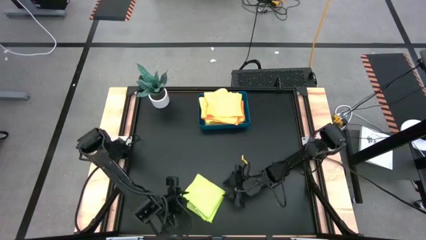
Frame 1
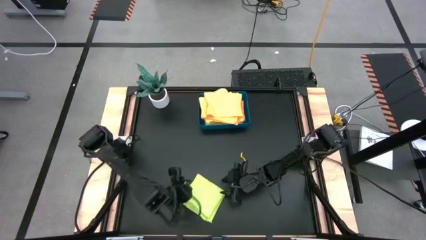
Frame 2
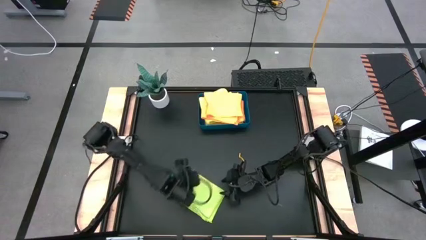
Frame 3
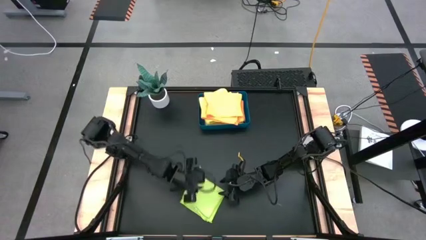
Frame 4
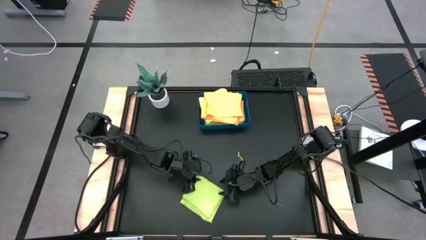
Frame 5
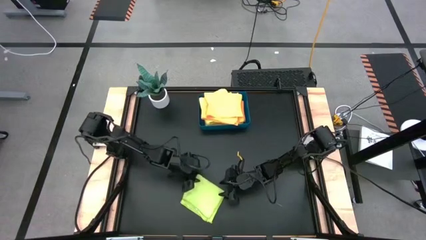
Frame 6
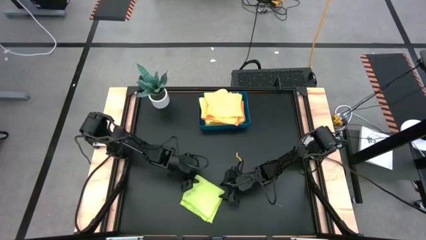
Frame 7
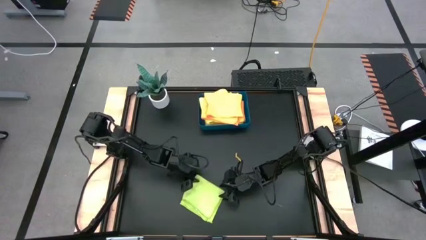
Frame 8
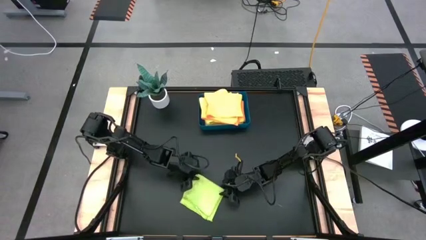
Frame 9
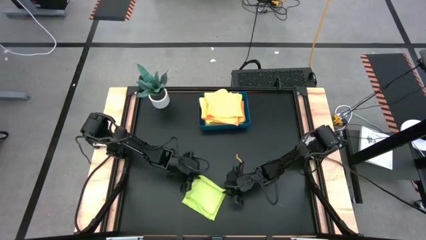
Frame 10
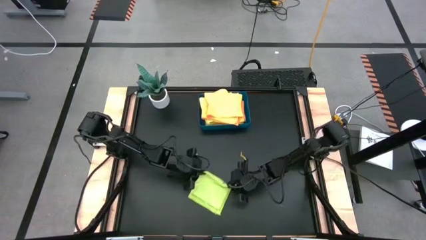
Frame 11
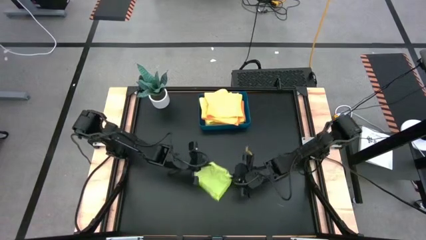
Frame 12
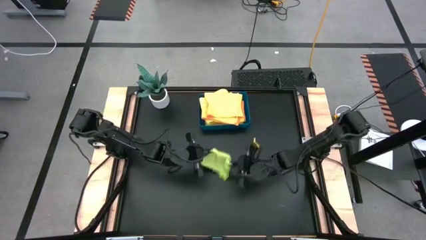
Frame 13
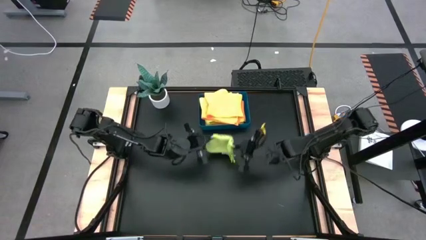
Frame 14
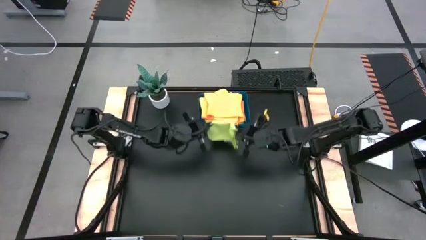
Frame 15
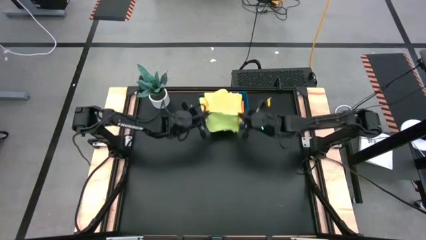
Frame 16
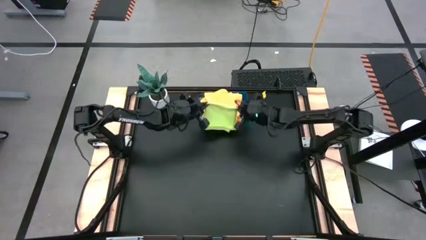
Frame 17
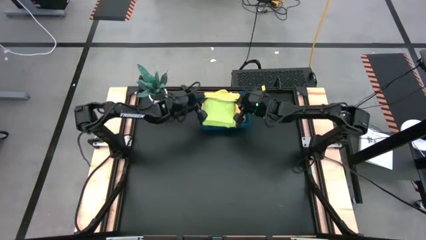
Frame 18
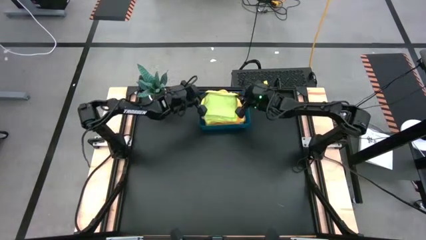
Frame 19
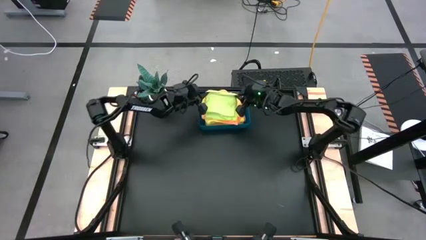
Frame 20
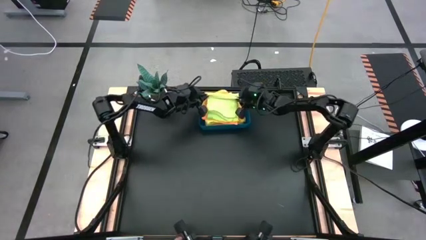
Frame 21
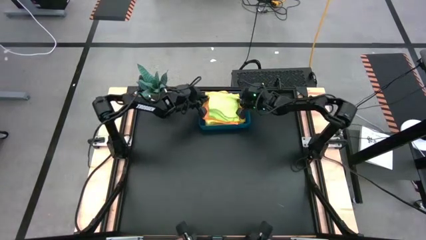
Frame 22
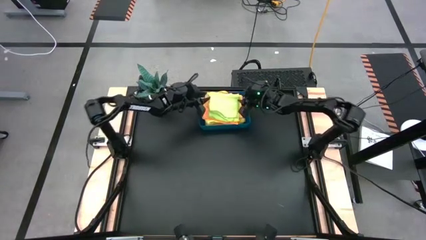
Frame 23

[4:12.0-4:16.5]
Task: Fold microfiber towels
Put the green microfiber cloth into the blue bin

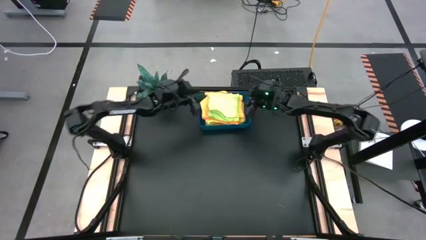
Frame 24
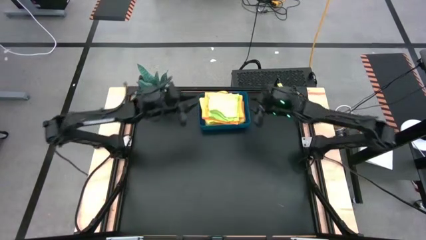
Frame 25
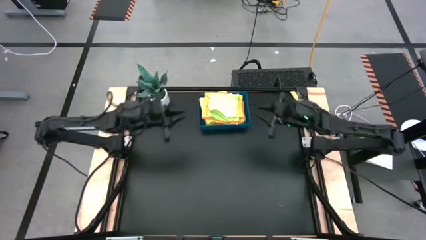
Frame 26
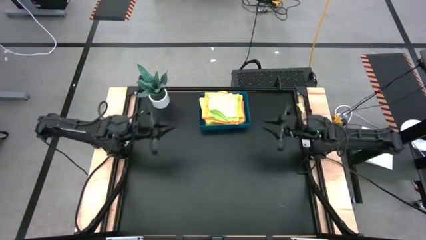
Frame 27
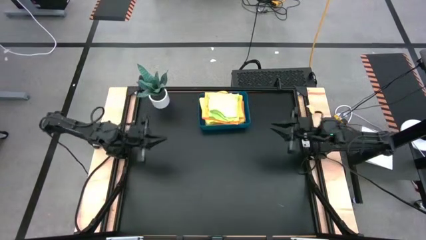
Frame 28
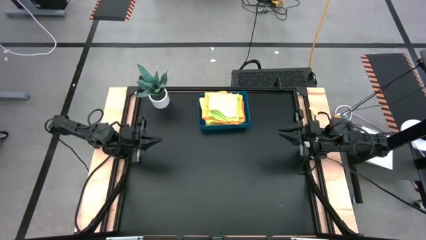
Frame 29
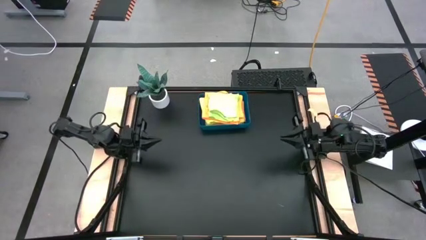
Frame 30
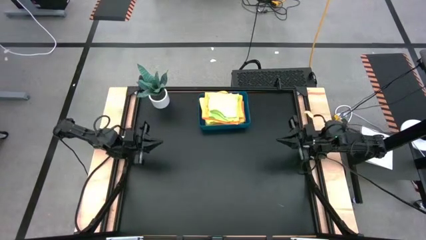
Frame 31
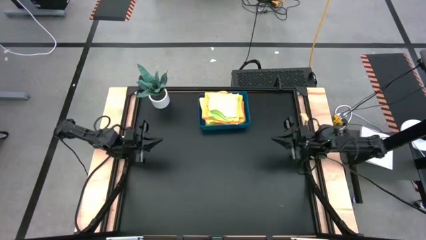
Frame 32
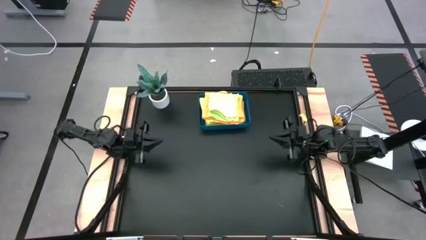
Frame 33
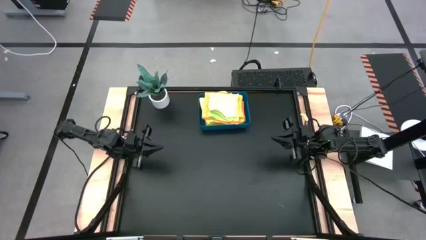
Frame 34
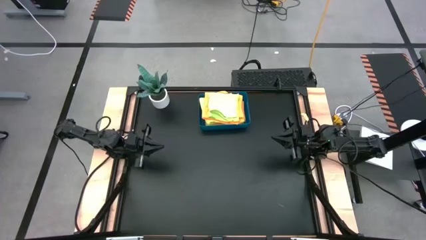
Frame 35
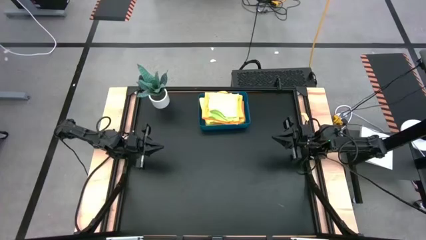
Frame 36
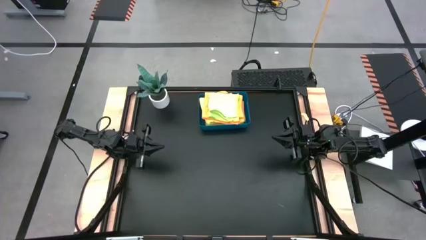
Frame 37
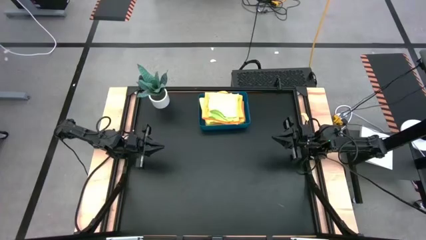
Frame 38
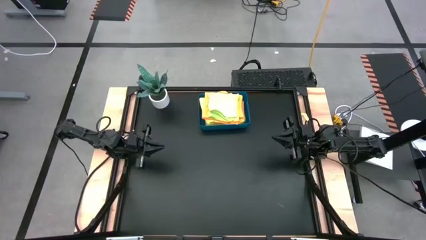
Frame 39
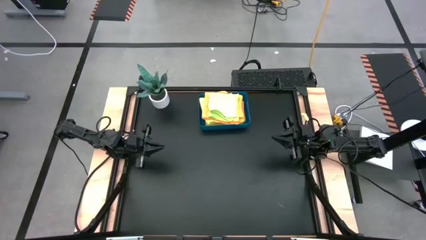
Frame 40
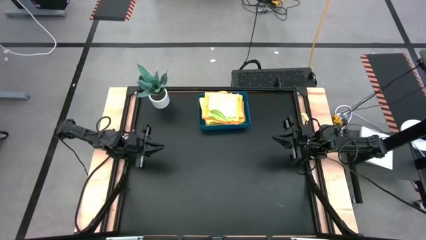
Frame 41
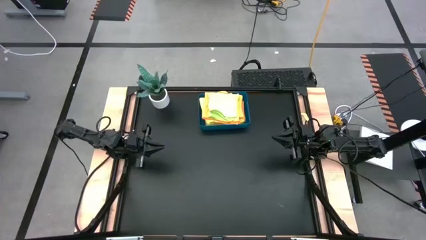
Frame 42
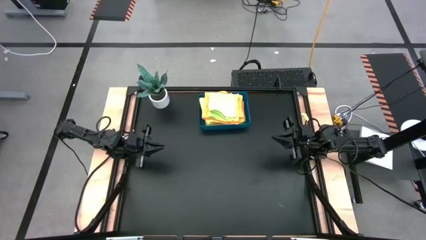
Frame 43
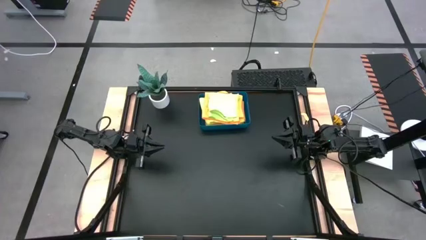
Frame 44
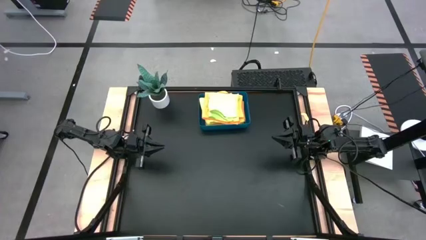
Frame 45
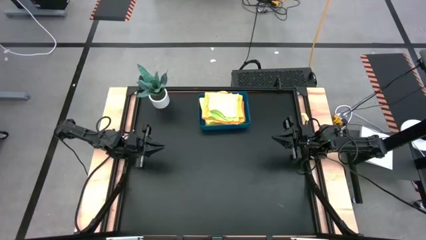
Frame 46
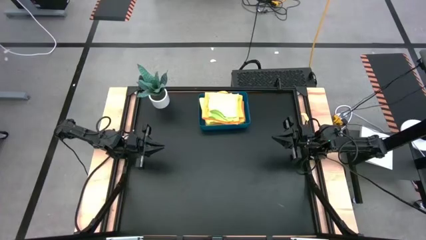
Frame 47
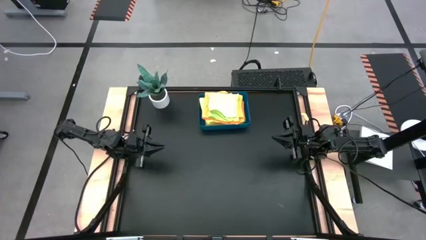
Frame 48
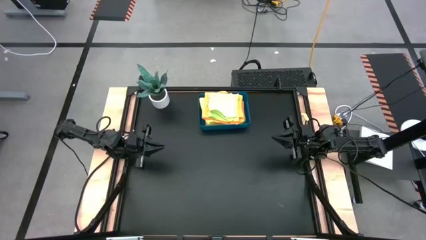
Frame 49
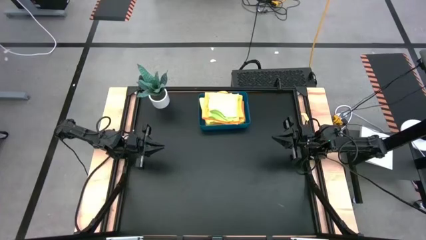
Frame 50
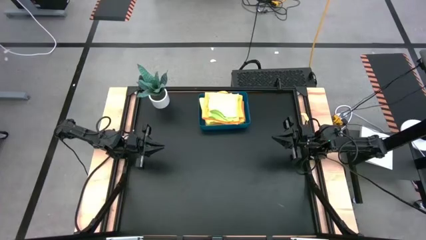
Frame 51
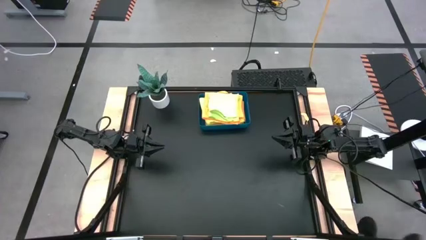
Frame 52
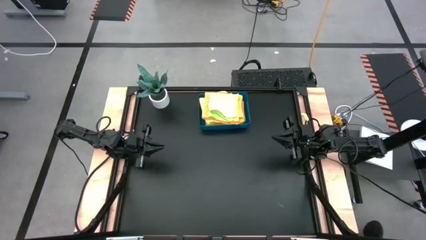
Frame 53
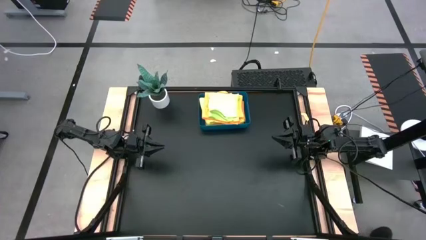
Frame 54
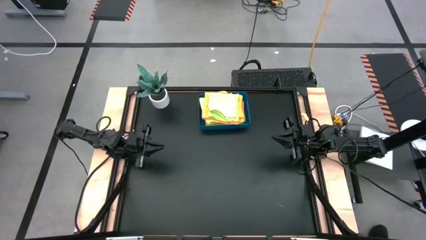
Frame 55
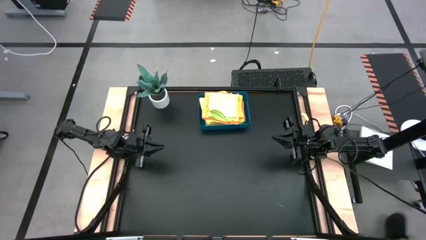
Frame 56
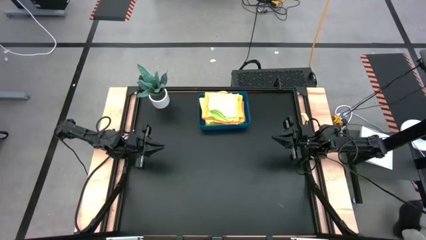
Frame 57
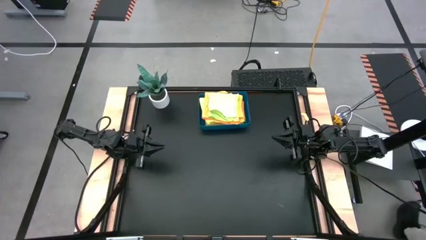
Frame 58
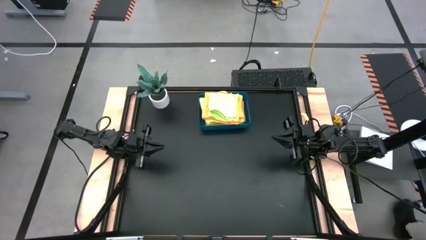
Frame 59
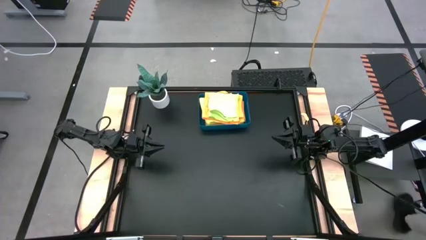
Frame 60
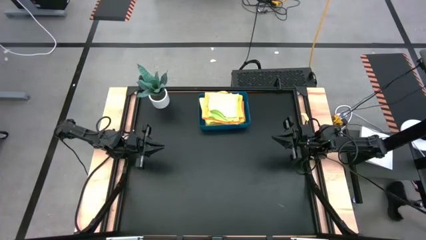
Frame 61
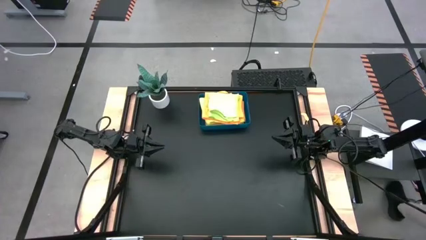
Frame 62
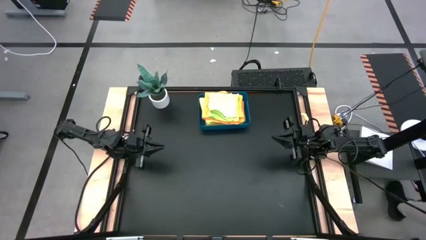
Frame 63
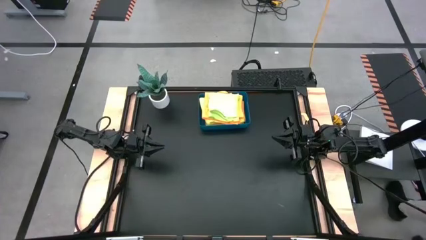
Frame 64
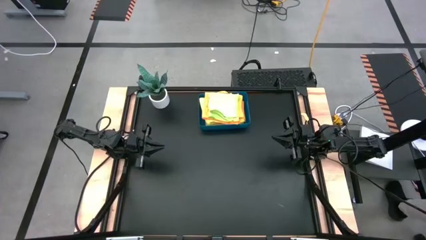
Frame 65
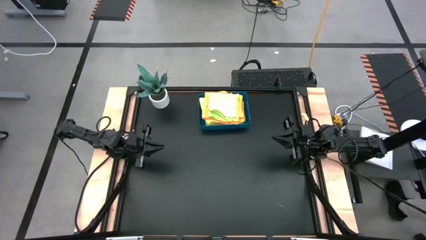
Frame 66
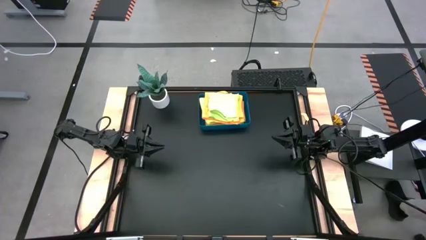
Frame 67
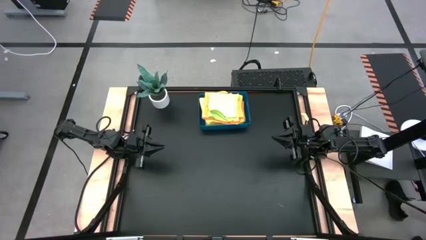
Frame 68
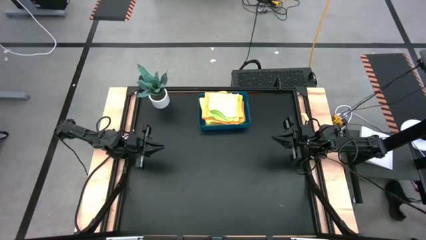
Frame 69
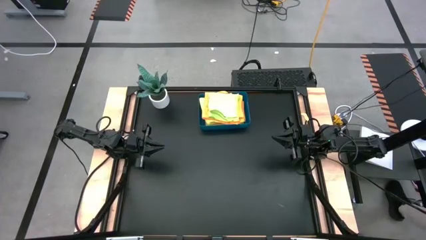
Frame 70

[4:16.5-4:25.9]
Return to Home Position
